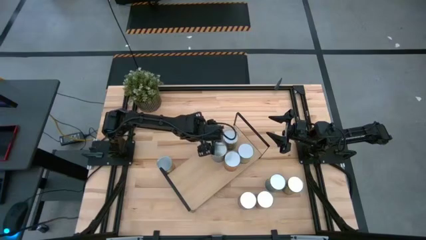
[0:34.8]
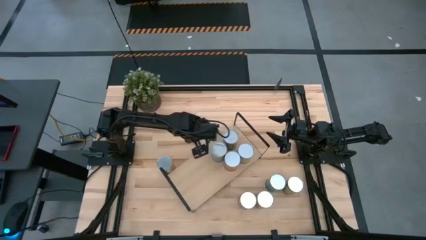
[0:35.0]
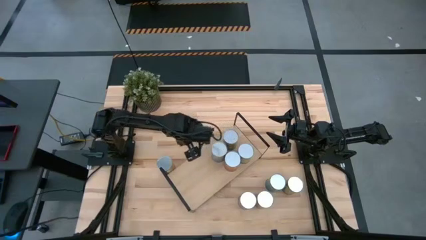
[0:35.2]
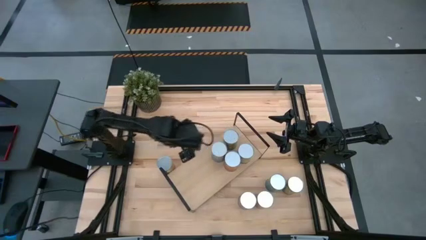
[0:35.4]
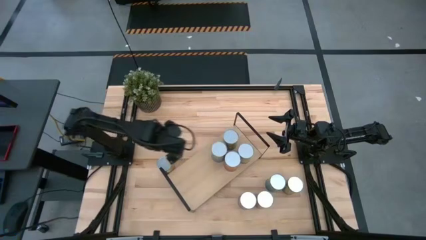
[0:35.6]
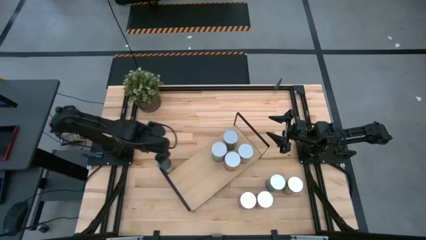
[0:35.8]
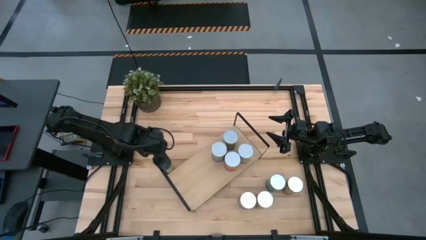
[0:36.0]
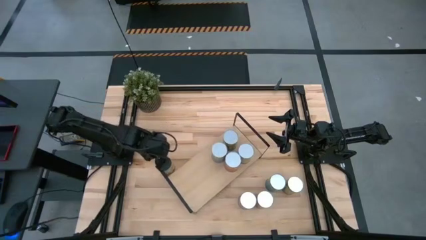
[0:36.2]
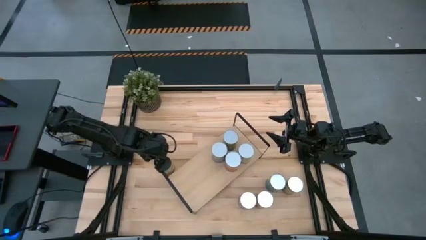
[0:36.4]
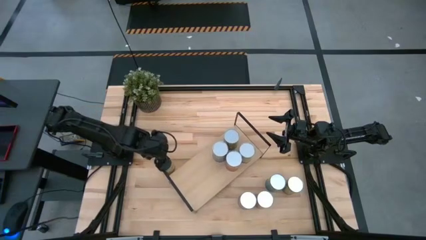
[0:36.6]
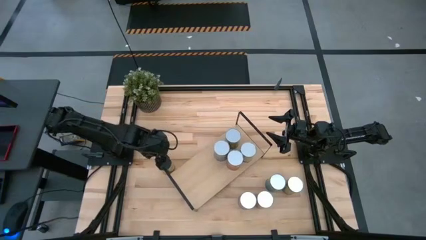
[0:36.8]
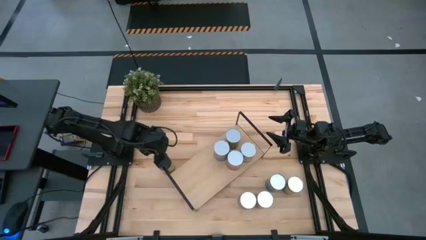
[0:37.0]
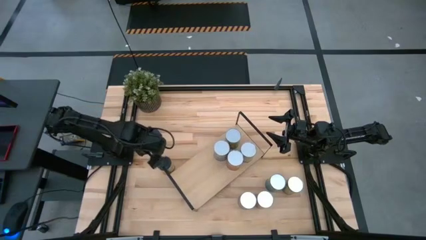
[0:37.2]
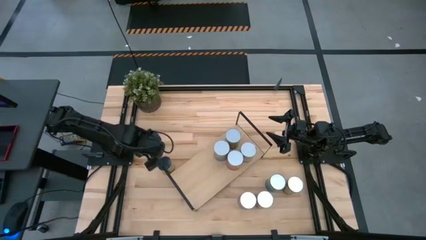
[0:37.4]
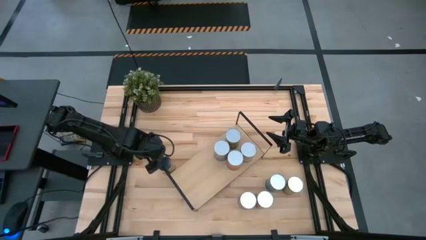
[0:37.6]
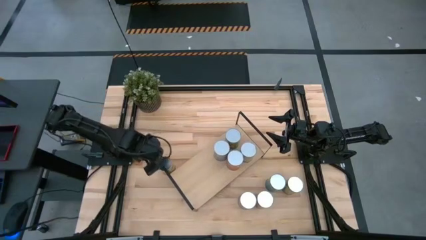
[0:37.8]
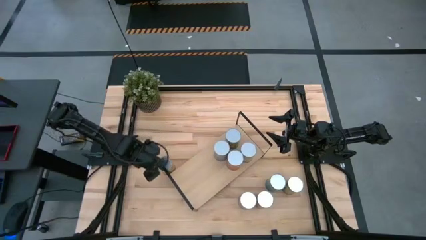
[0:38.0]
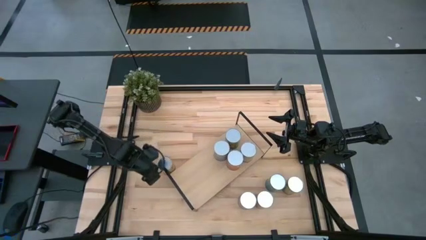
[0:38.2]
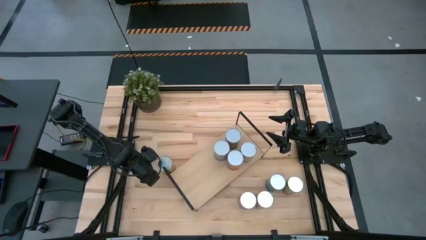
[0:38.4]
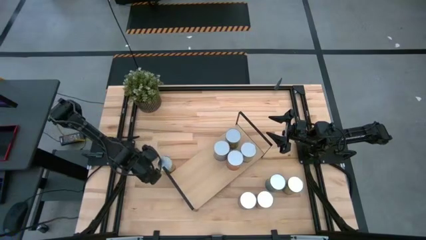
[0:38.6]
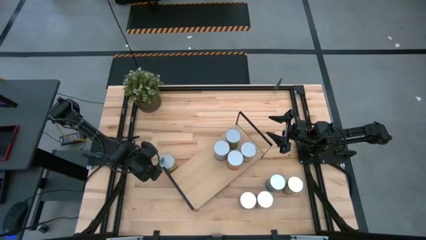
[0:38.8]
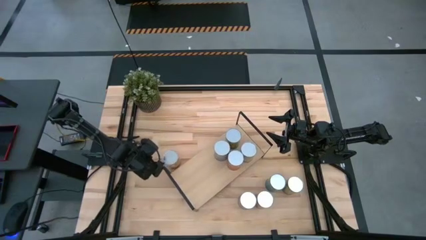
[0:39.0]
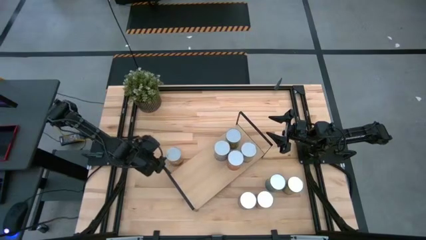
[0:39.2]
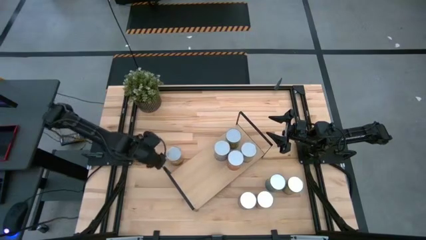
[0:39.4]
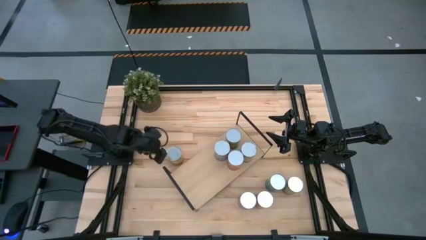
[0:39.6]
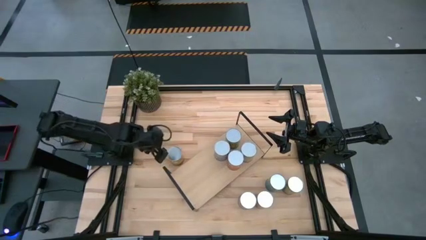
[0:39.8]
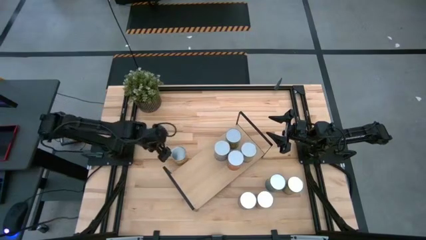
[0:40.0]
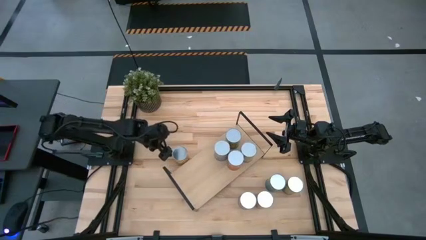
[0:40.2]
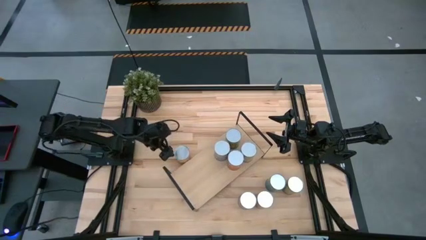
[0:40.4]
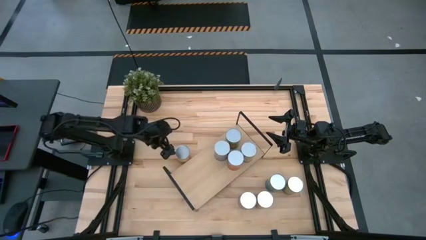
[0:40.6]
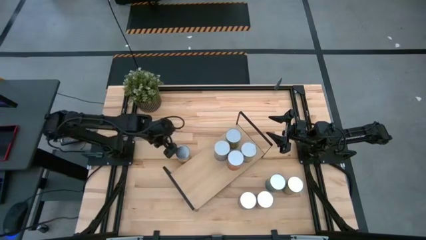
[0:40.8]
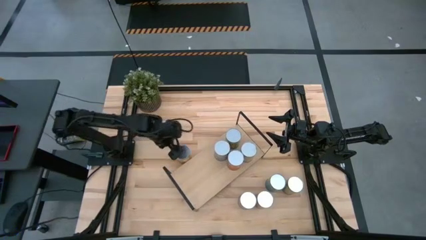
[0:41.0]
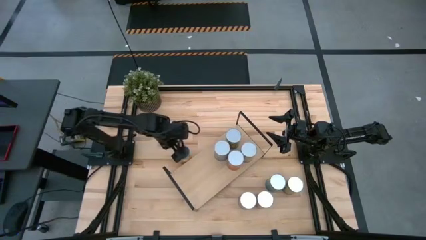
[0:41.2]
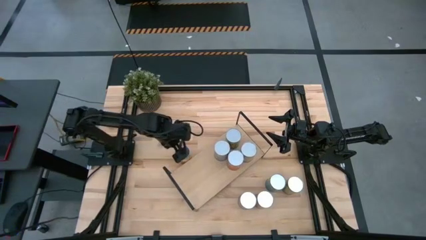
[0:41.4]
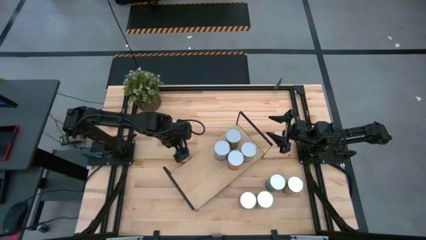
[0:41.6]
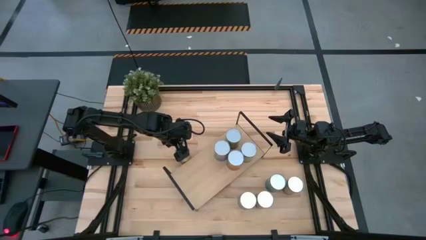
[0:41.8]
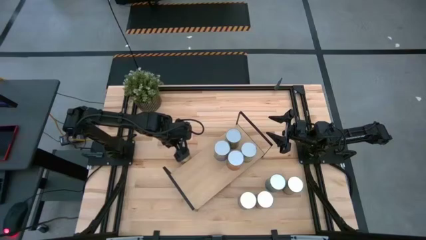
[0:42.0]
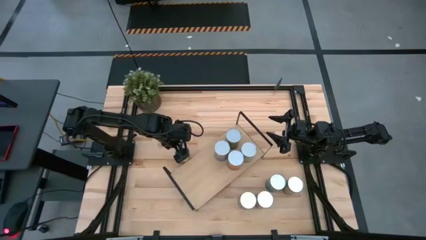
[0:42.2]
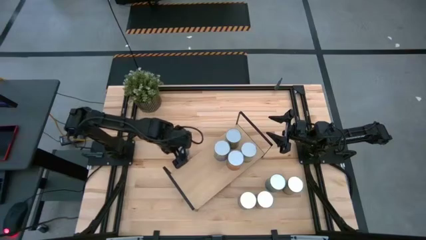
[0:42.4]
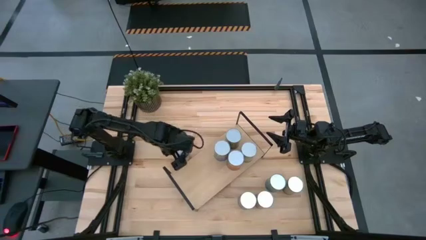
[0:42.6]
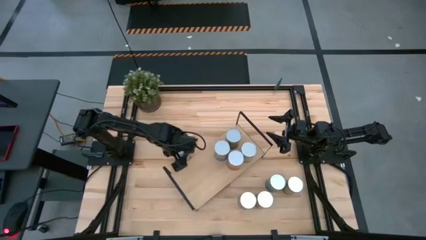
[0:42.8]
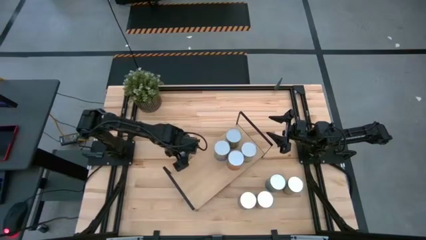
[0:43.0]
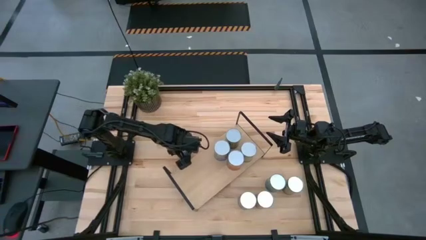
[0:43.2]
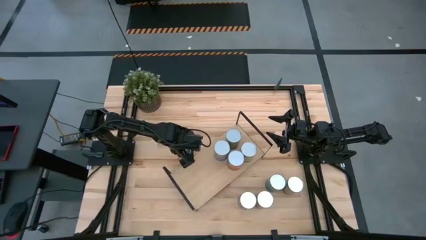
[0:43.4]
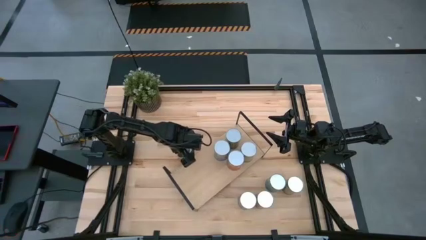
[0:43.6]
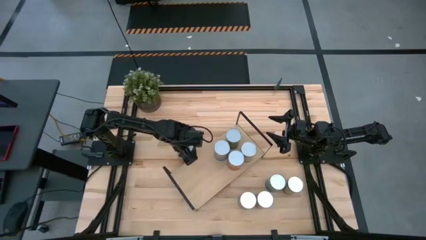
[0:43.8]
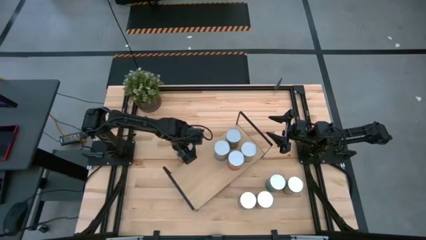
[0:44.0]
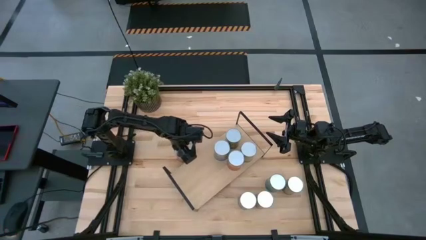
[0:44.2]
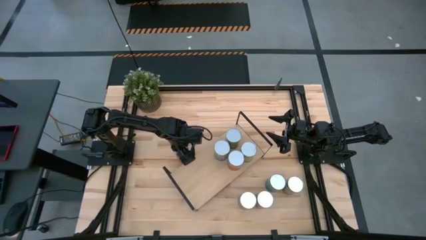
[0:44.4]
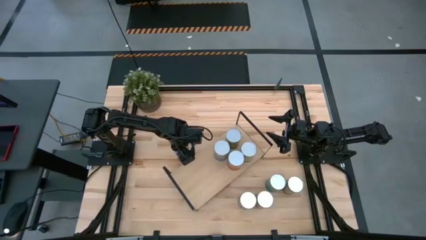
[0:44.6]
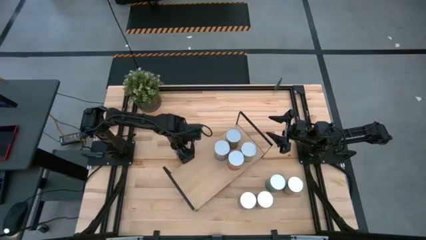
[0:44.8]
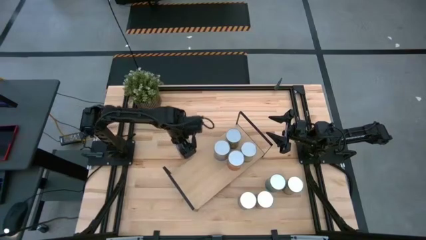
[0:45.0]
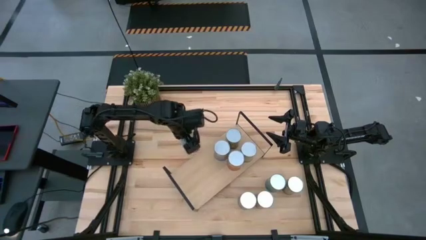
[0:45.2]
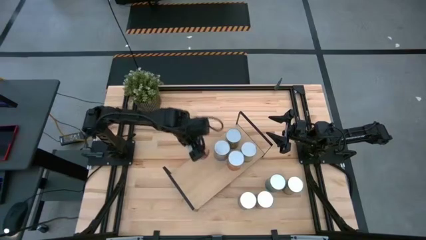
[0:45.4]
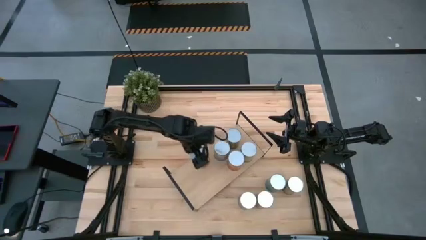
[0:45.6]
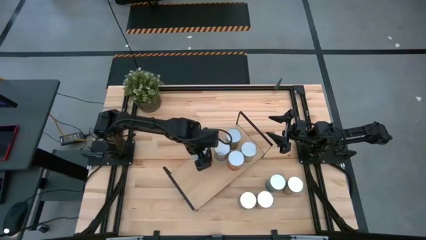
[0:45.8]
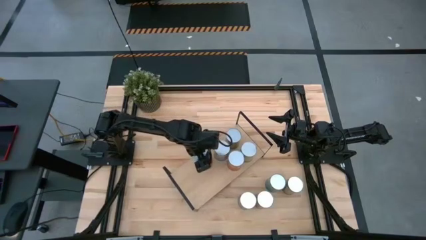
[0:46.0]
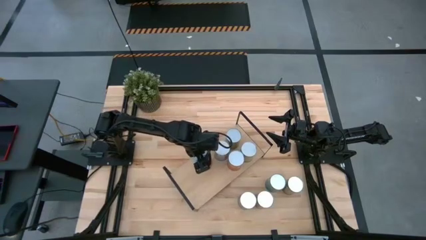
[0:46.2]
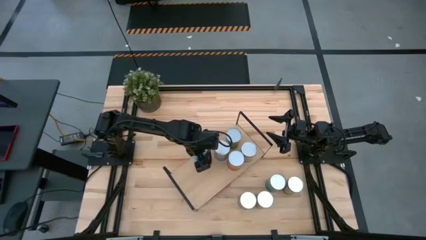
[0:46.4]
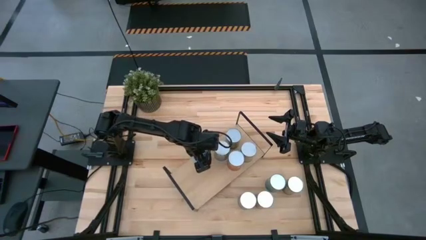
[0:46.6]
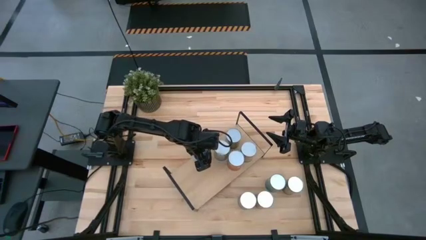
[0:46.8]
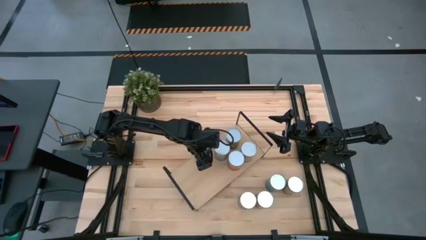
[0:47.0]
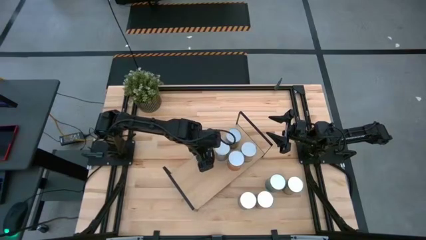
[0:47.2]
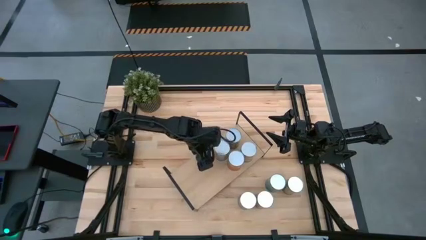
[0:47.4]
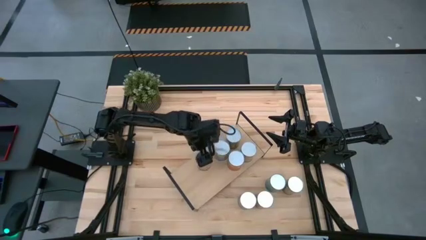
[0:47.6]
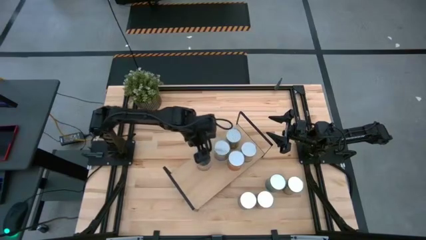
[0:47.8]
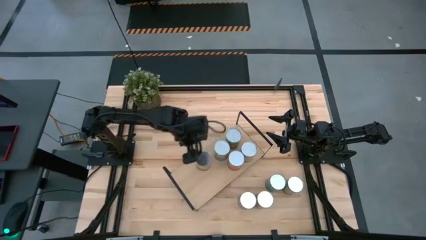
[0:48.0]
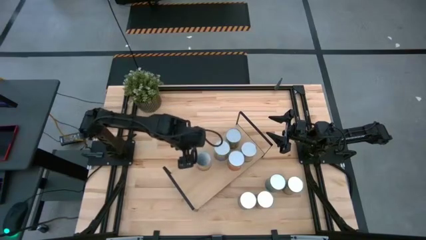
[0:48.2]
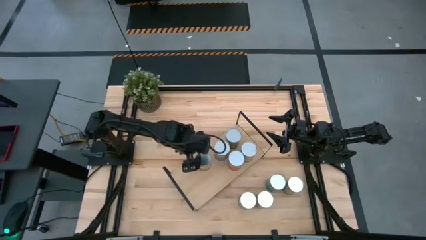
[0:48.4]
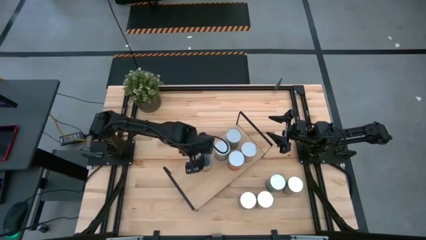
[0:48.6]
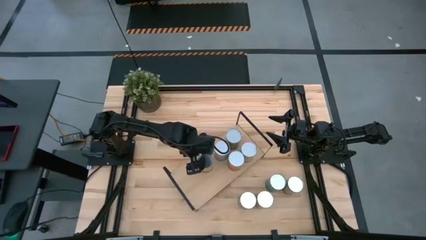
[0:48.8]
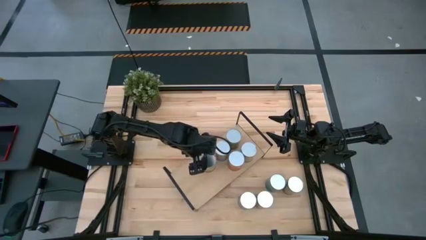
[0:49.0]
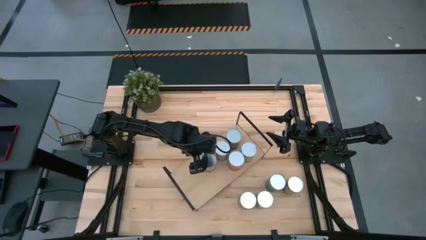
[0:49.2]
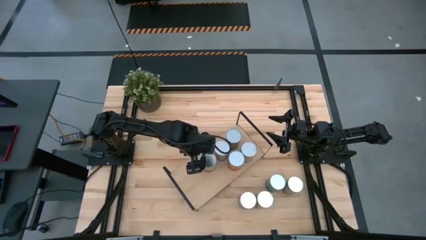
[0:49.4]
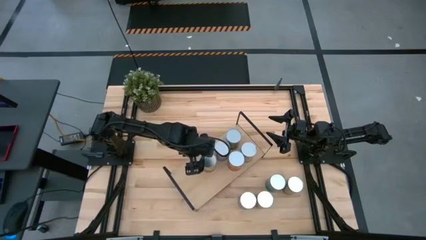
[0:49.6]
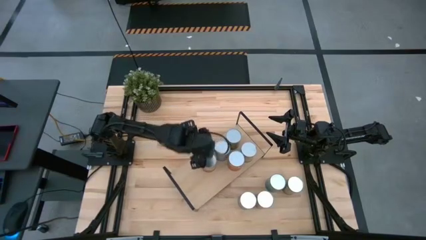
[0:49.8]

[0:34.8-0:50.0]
Task: Pick and place cans onto a shelf
Put the canned corn on the shelf

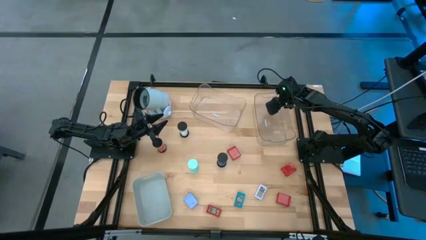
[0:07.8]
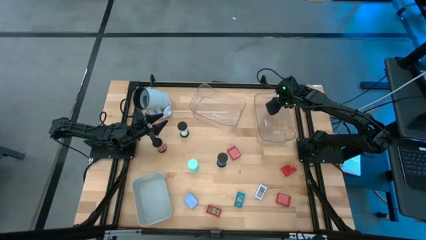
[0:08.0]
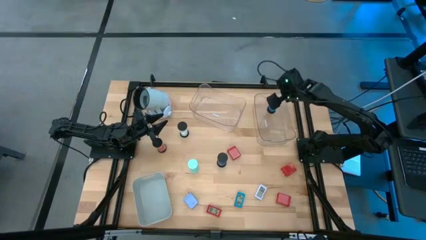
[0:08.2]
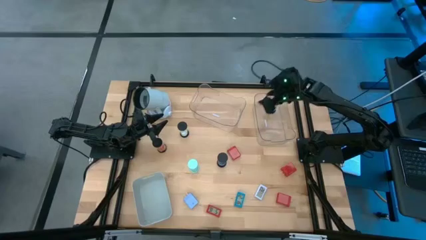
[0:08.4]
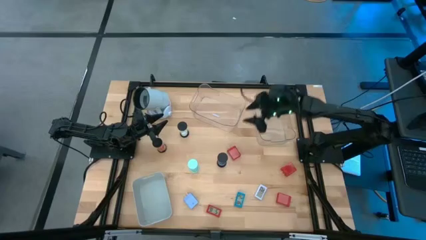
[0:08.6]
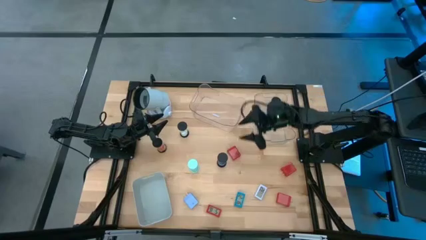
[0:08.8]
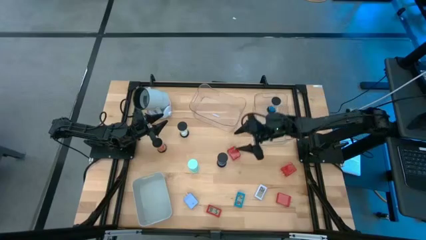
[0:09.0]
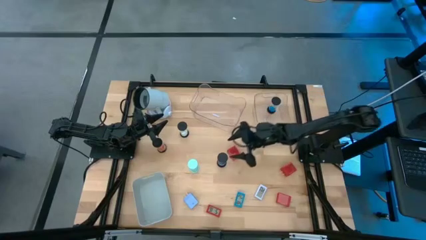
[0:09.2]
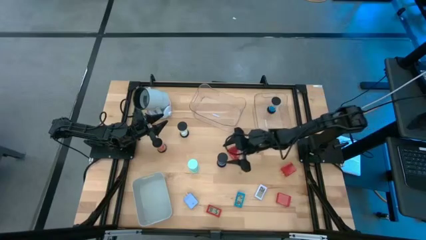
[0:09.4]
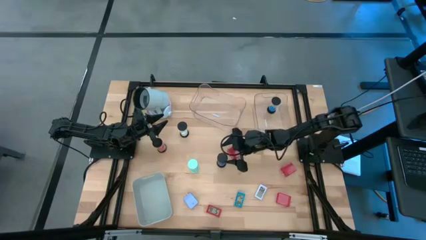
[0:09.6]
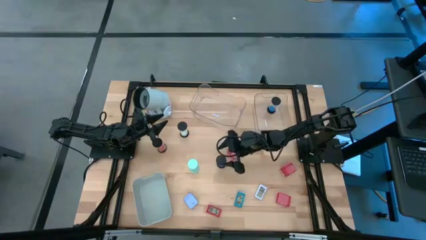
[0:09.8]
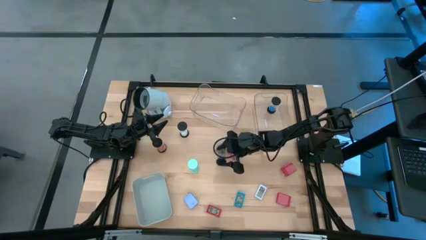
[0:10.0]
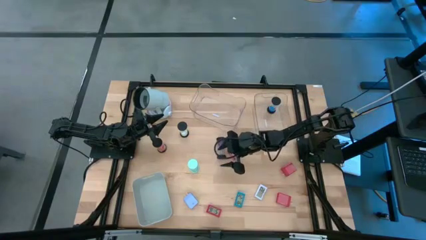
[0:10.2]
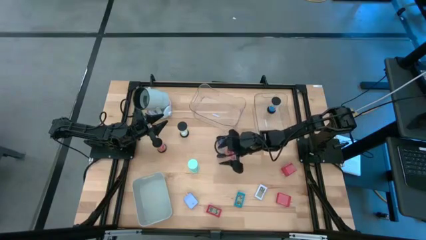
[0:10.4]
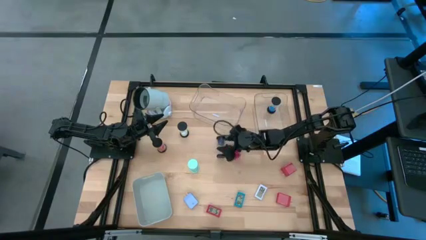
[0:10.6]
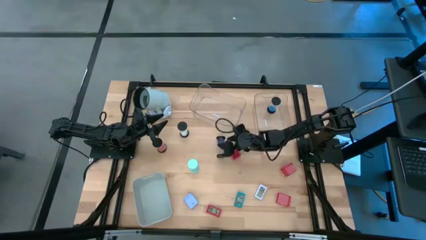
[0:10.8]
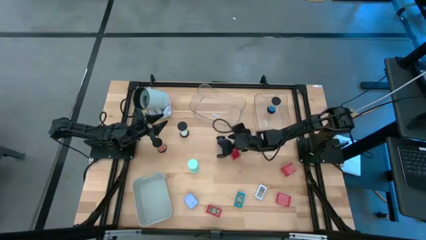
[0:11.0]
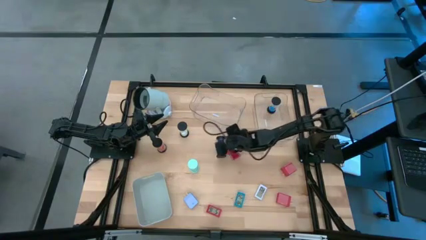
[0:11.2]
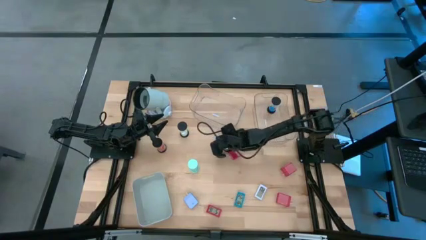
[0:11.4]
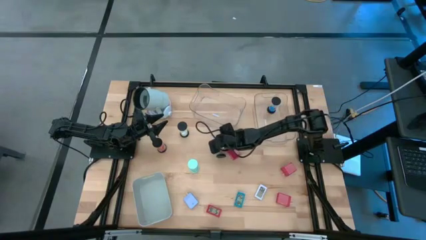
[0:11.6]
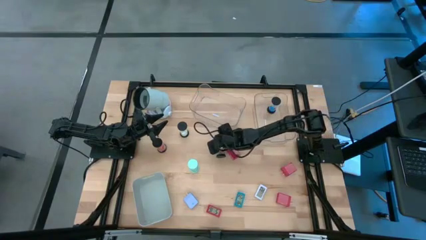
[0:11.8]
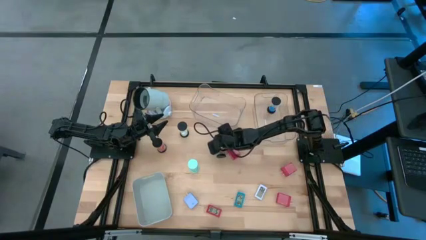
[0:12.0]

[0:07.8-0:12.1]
Task: Pick & Place Office items
Put the dark blue hourglass into the right transparent bin
